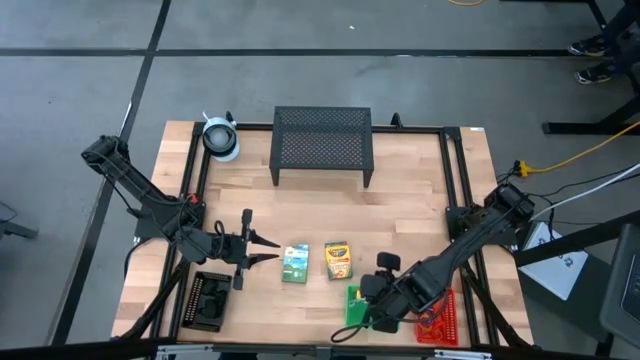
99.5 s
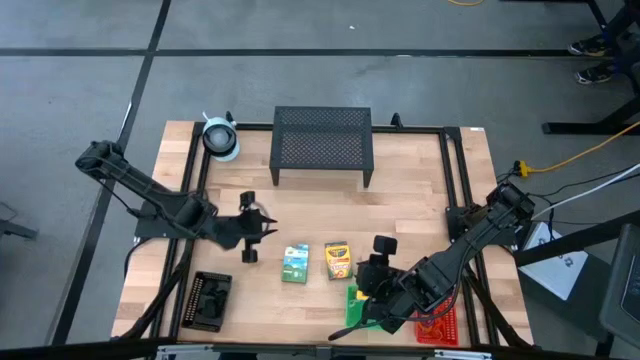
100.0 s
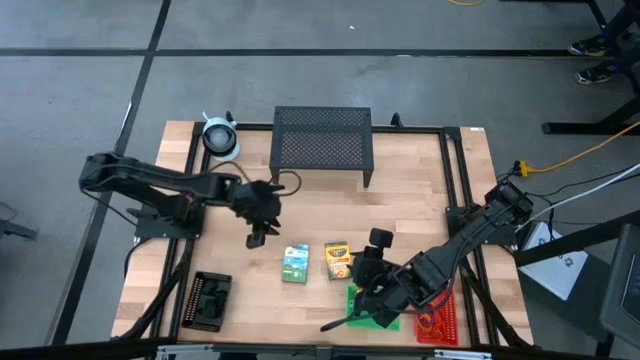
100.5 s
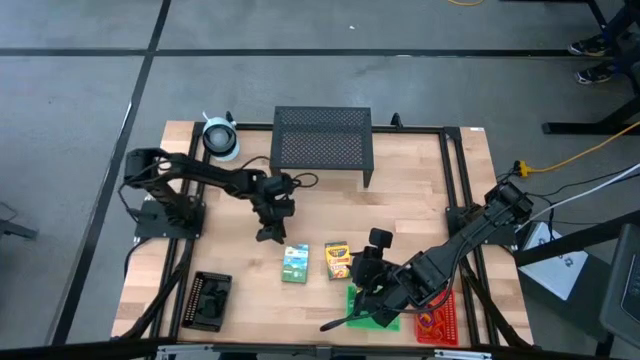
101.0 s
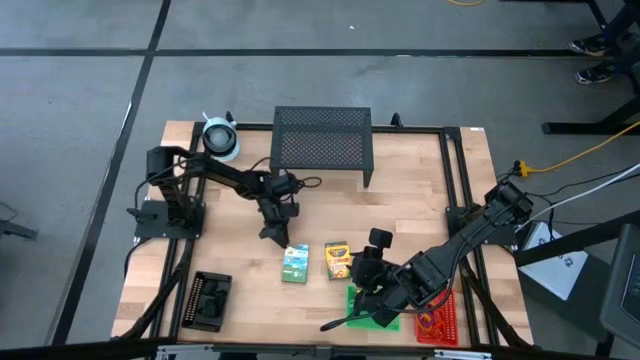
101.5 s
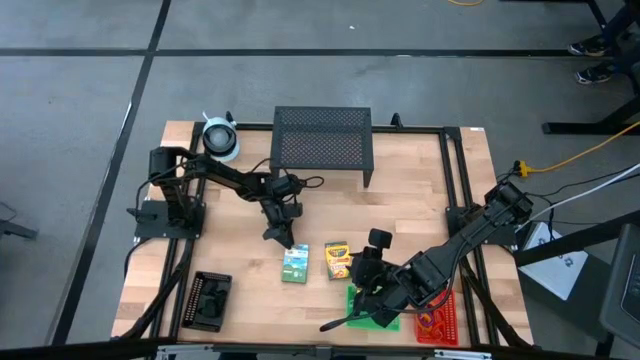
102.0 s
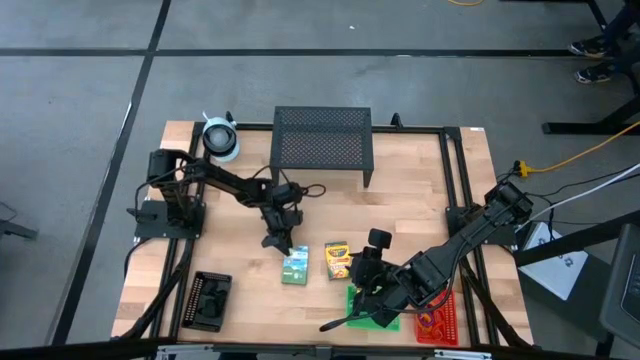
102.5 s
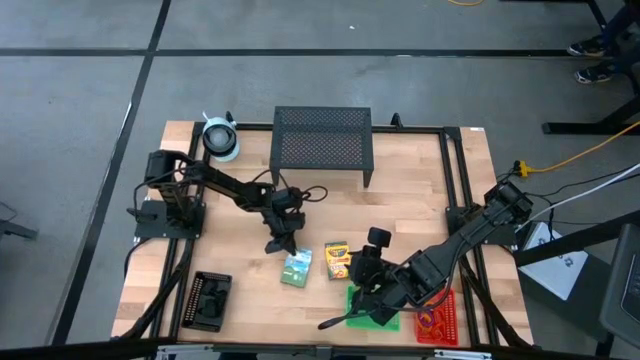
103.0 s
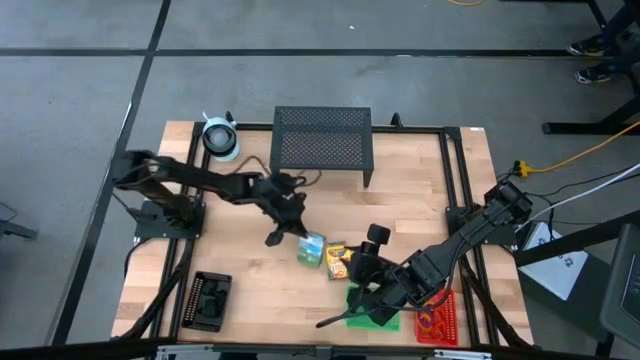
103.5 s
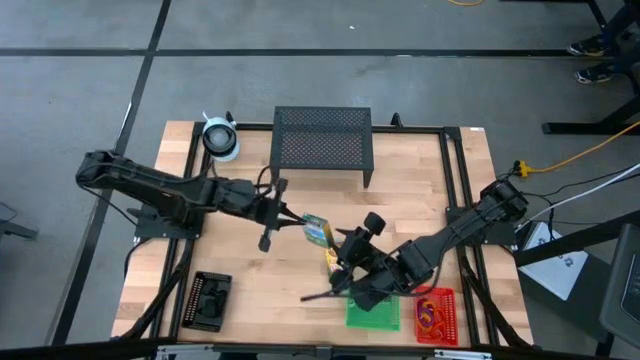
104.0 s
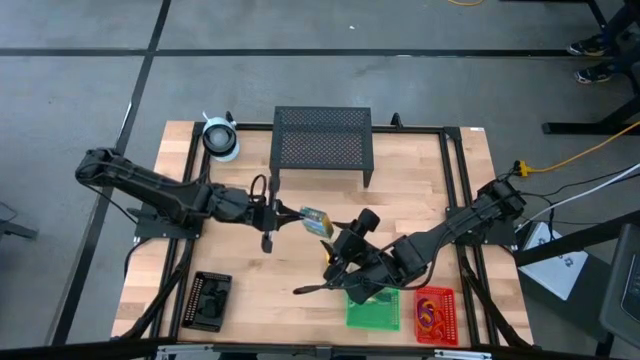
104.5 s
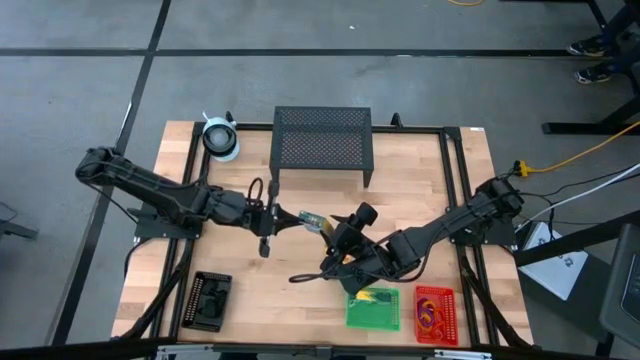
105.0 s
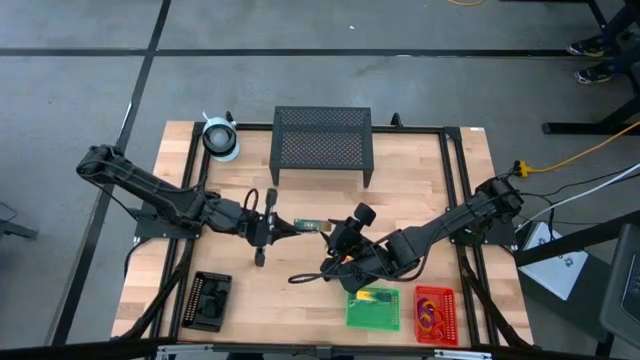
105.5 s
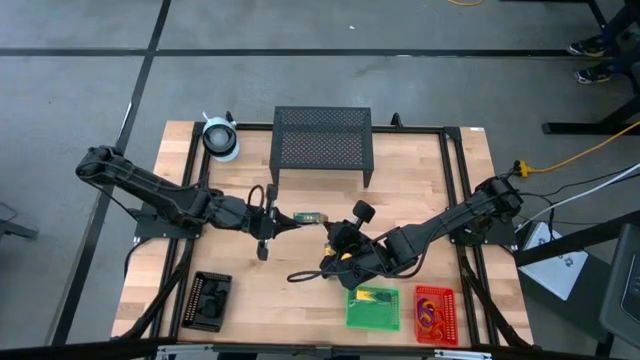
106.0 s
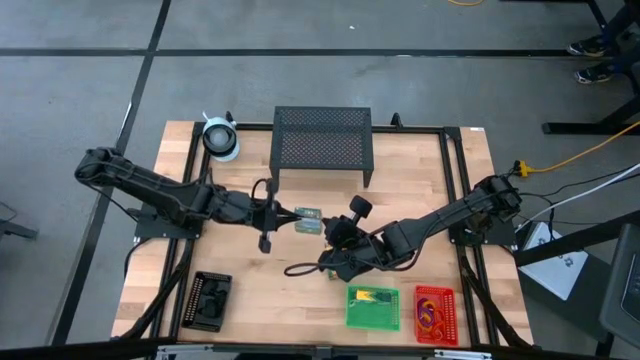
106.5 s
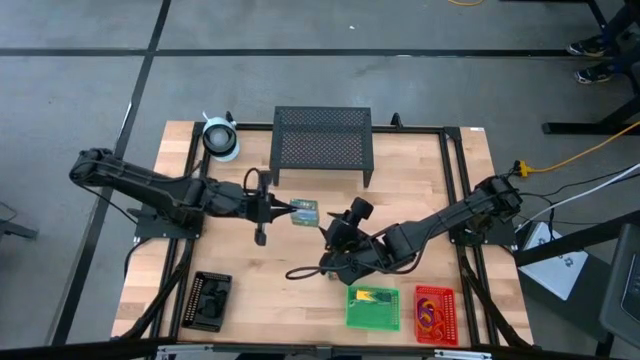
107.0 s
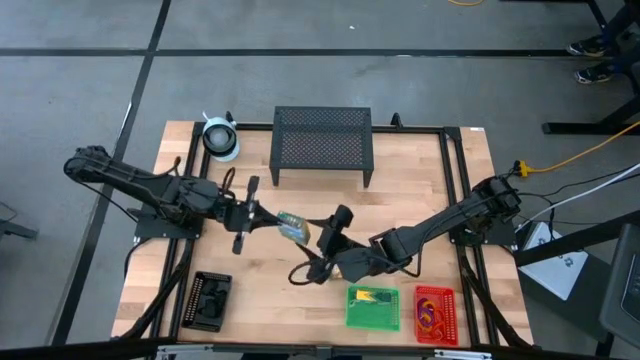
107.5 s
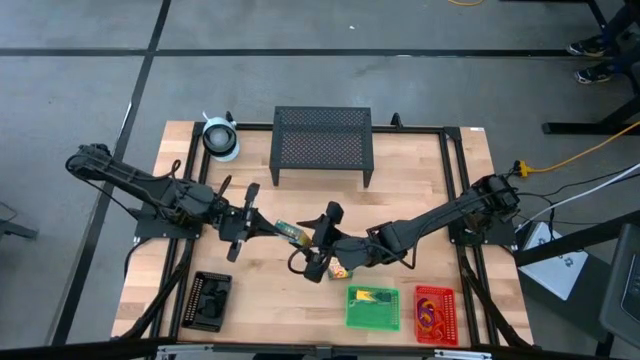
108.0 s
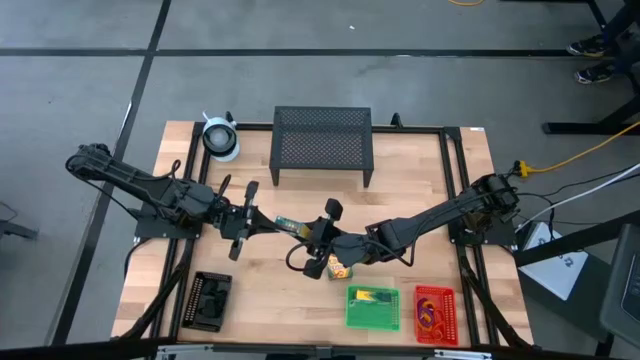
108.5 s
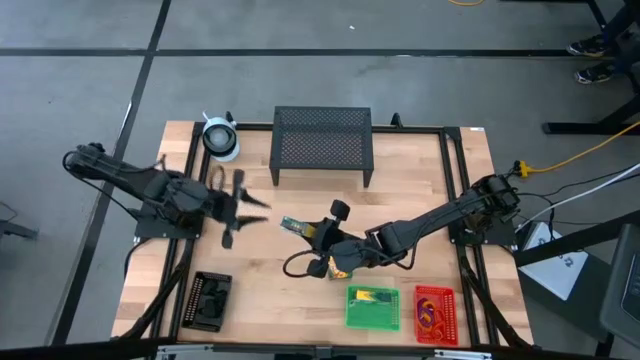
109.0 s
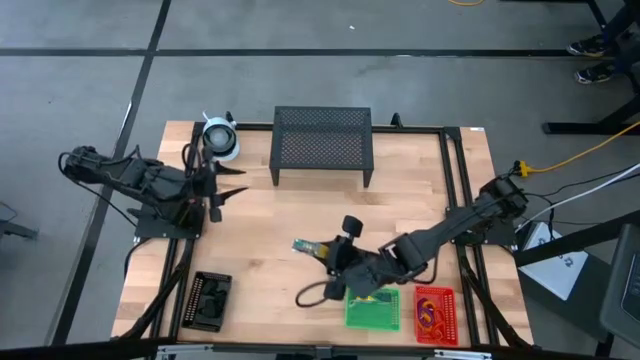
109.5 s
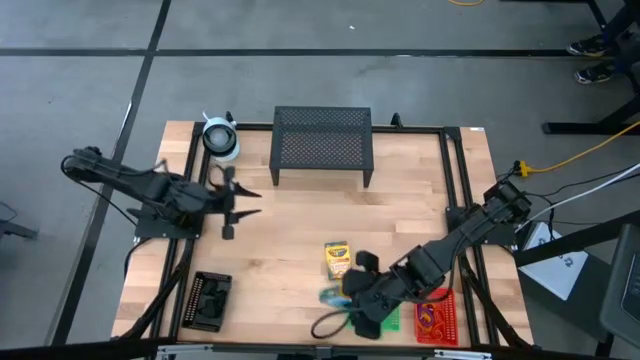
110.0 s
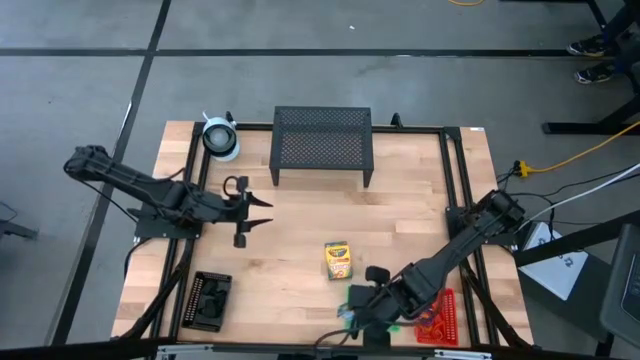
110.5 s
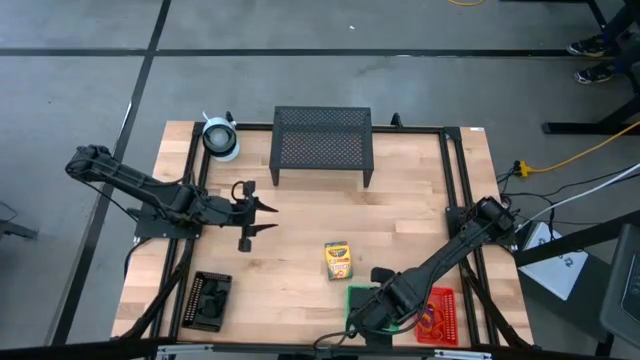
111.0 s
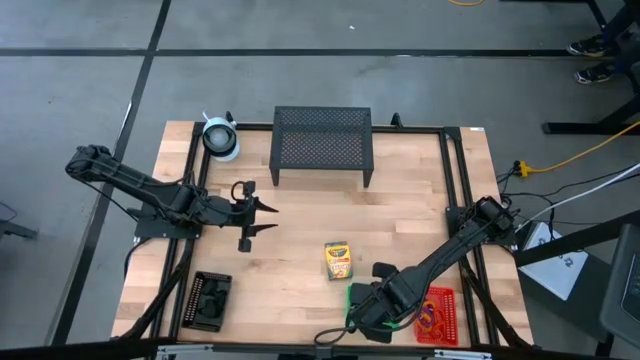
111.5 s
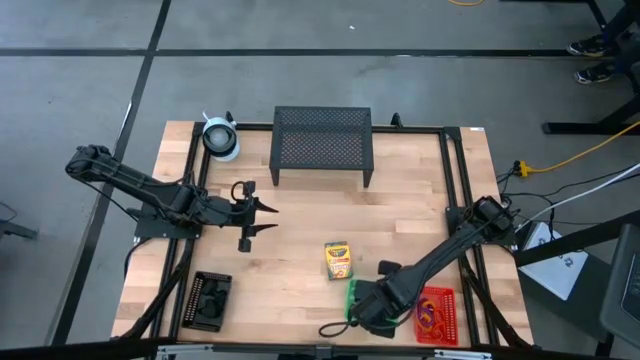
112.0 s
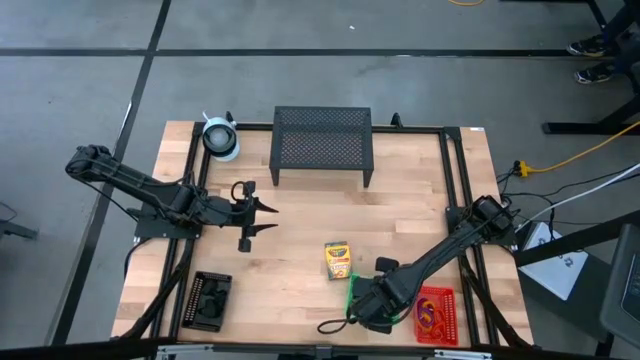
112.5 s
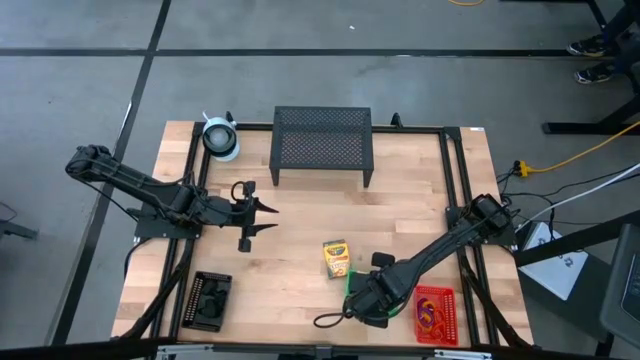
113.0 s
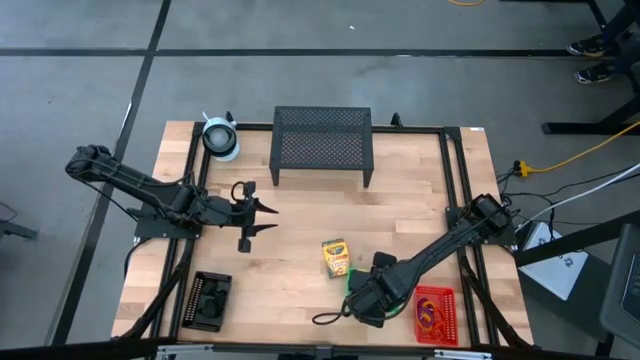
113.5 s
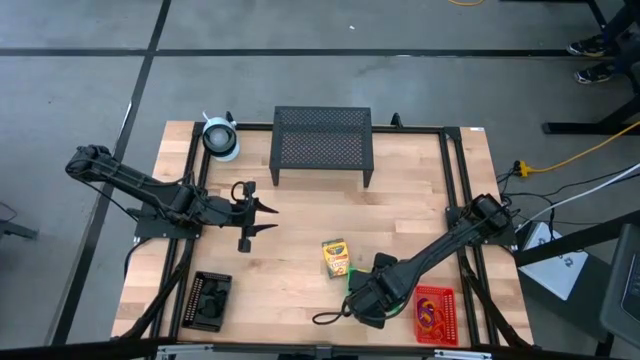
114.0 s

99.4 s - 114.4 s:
Task: Pick & Place Office Desk Supplies
Put the yellow green crayon box into the green bin

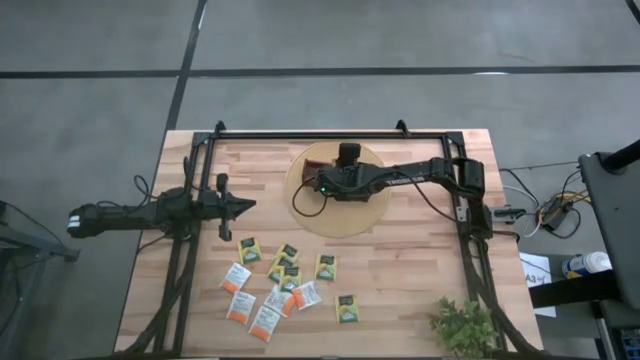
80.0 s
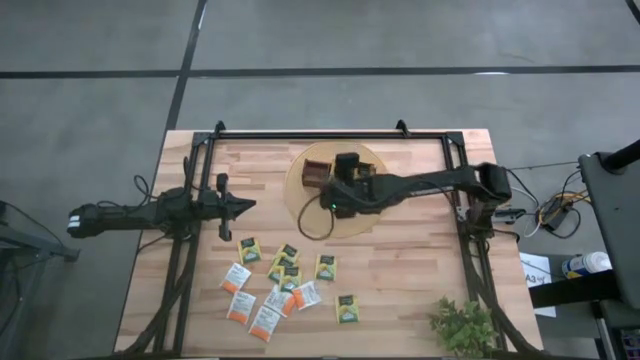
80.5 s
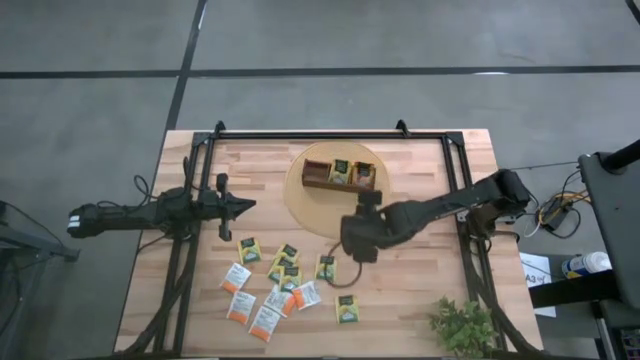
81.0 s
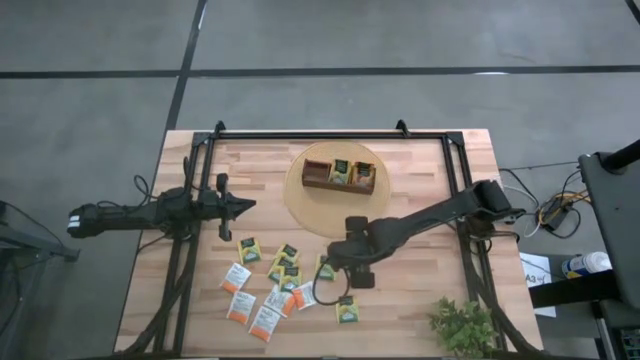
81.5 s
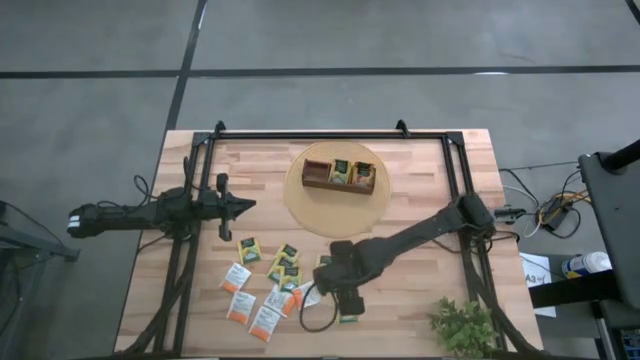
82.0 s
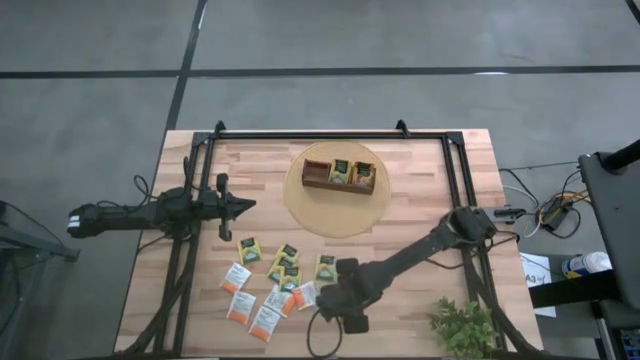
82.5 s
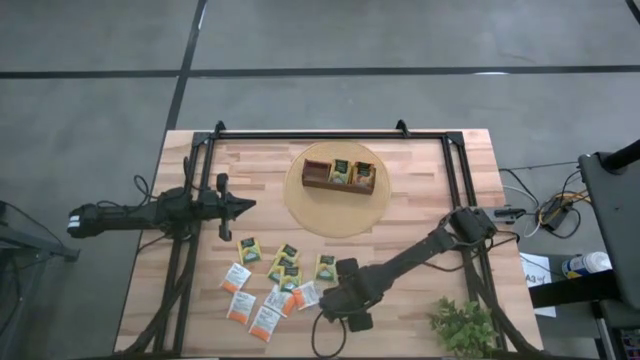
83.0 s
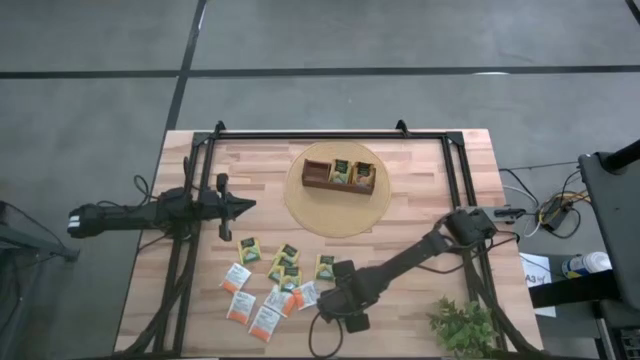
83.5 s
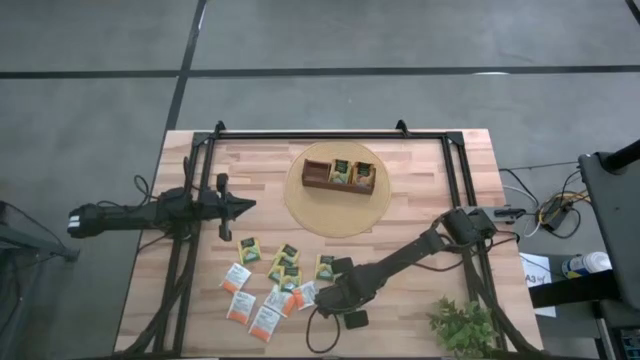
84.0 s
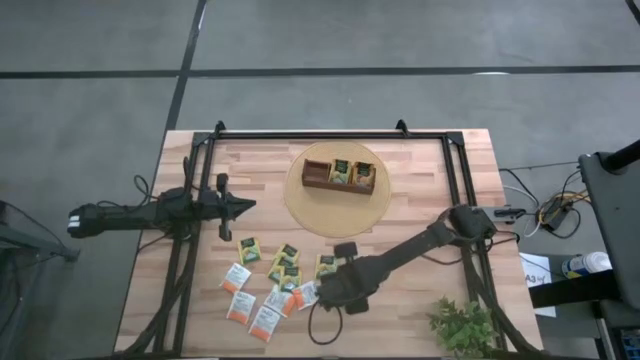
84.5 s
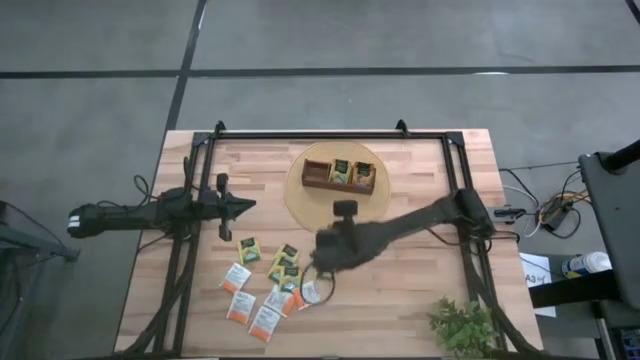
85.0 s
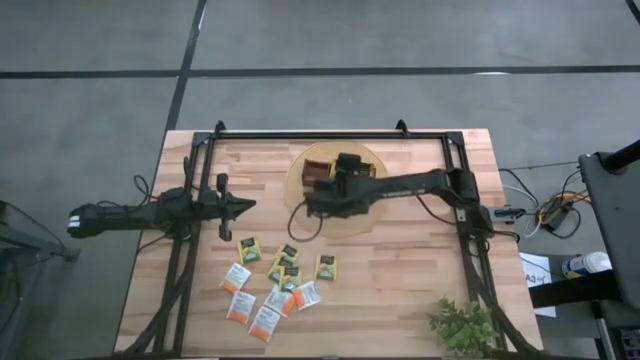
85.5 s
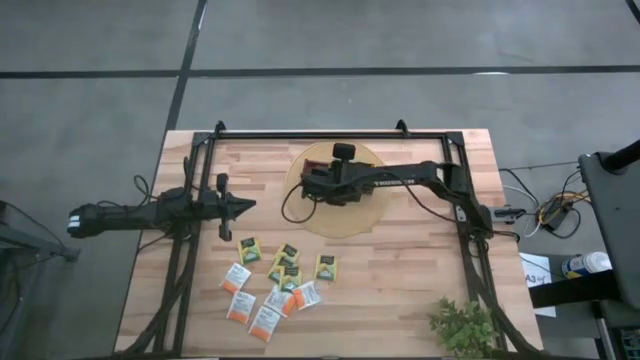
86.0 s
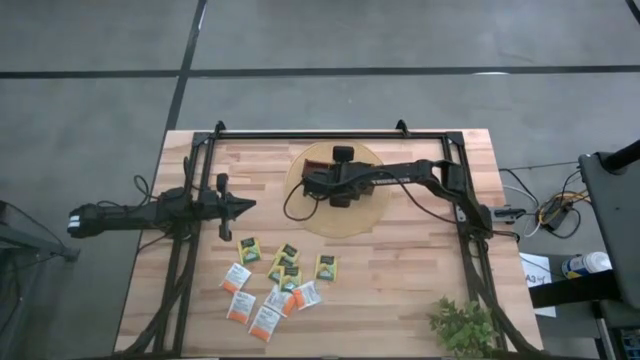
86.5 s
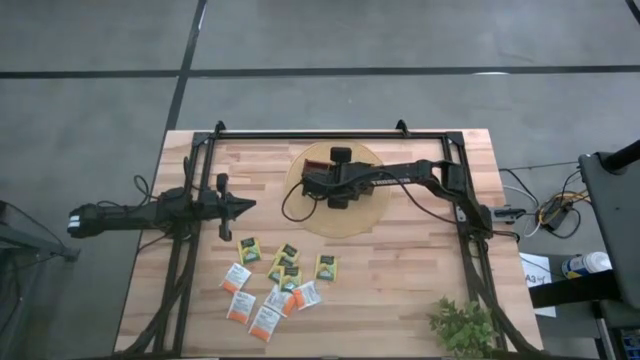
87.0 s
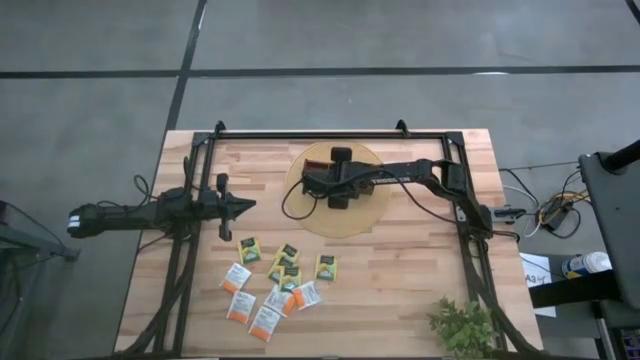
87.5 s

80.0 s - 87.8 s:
Task: Pick & Place Tea
Put the green tea bag into the middle section of wooden organizer

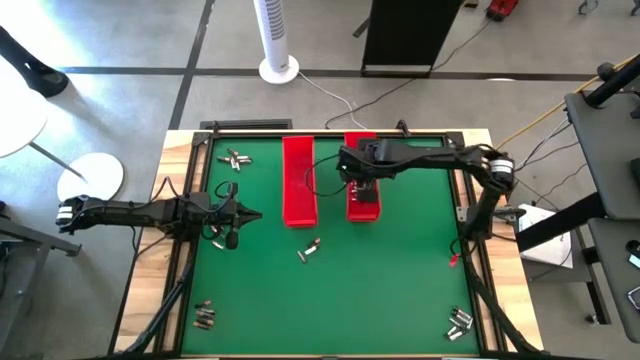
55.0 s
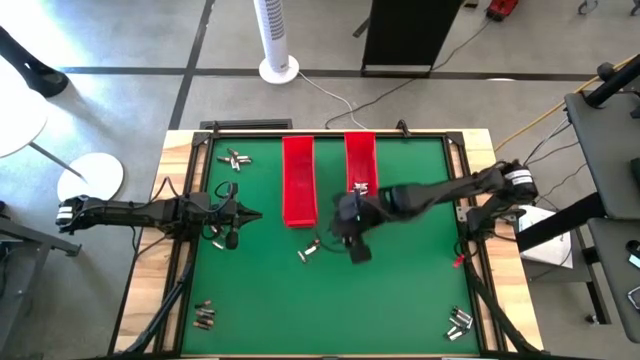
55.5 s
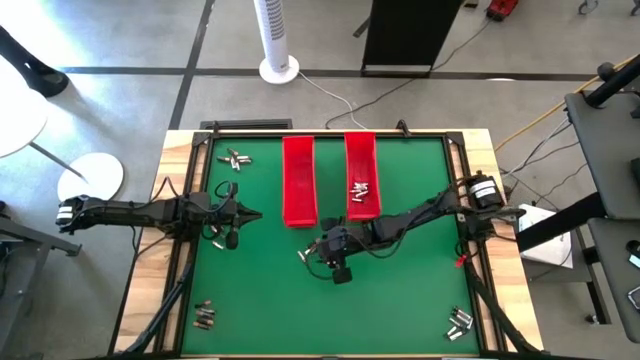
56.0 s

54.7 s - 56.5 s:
Task: Sort batteries
Put the silver battery into the right red bin
